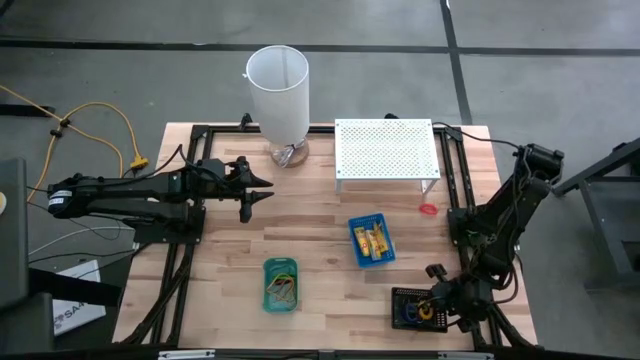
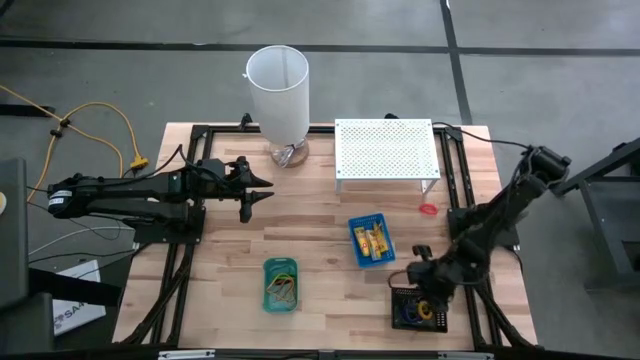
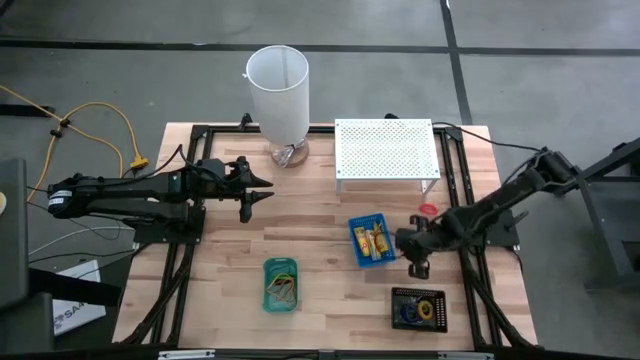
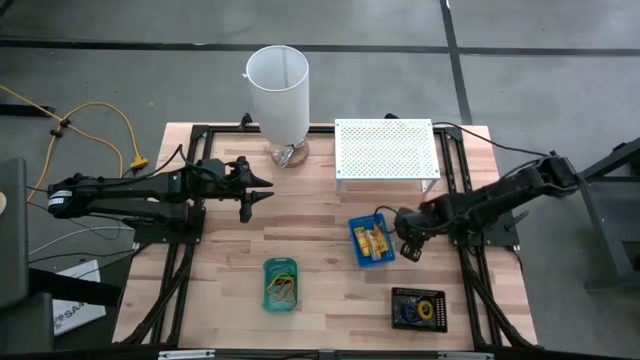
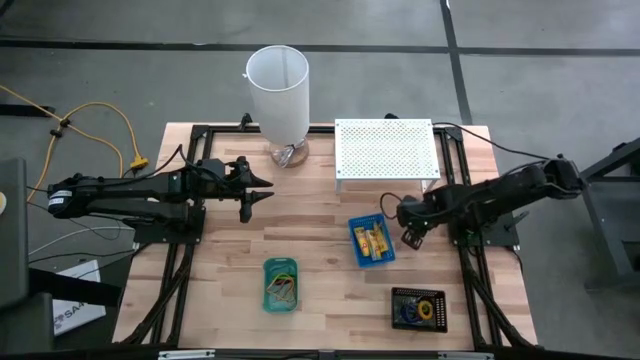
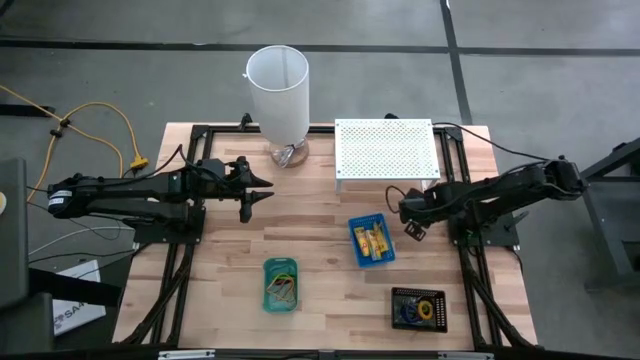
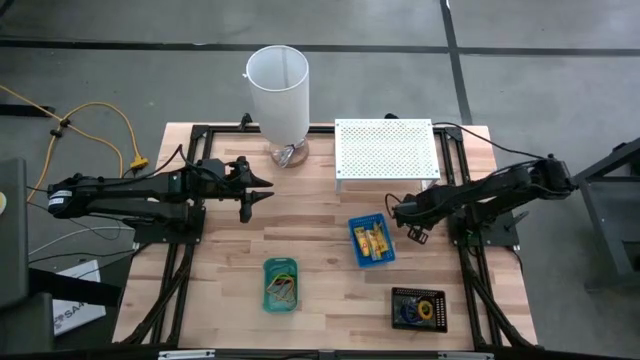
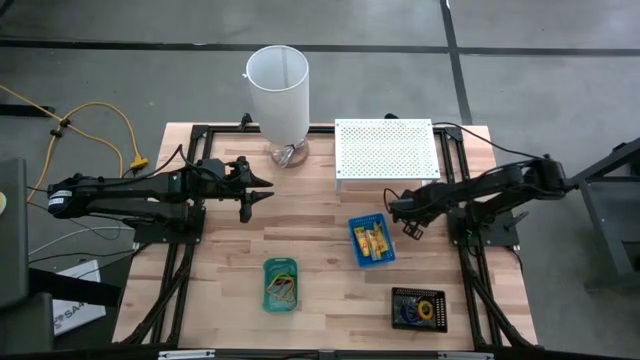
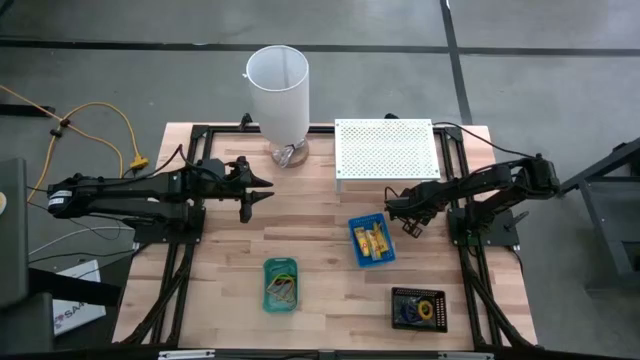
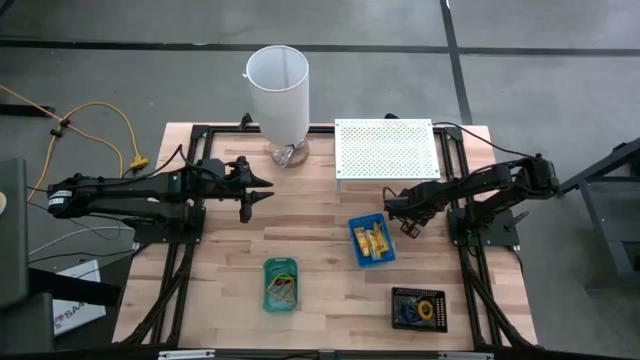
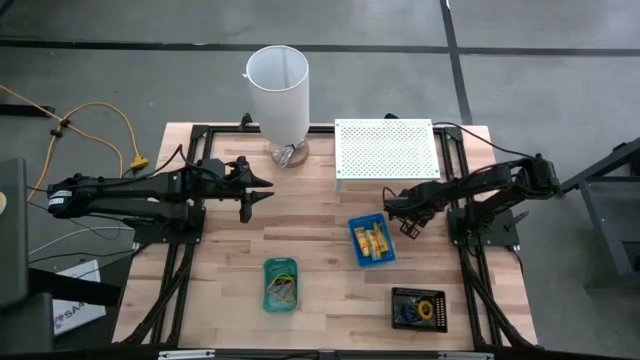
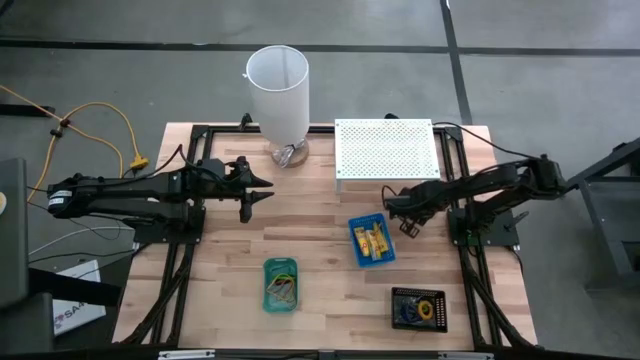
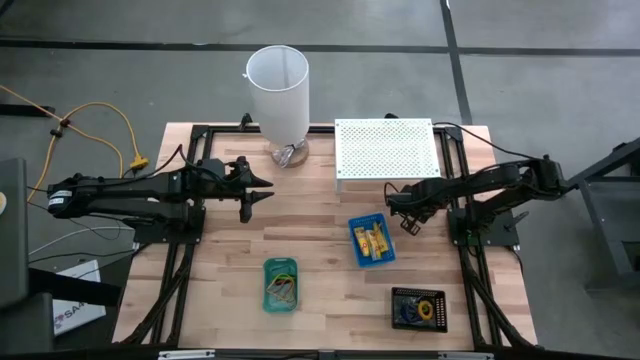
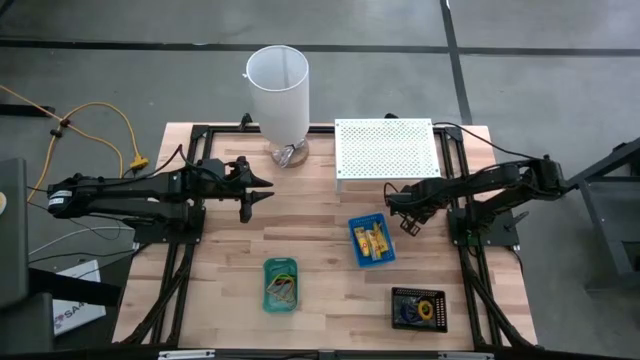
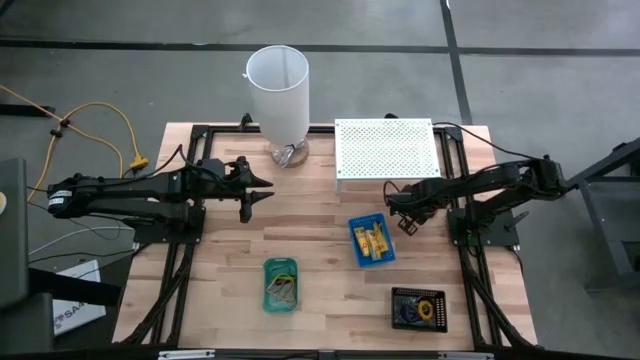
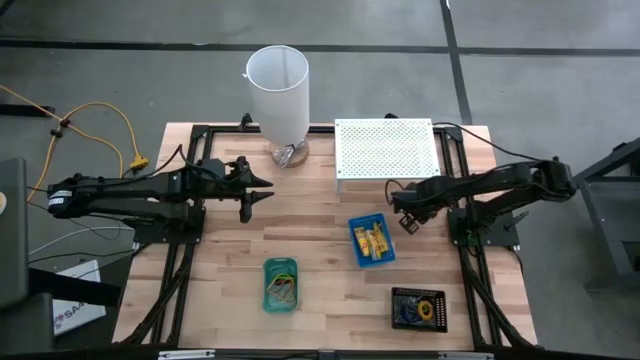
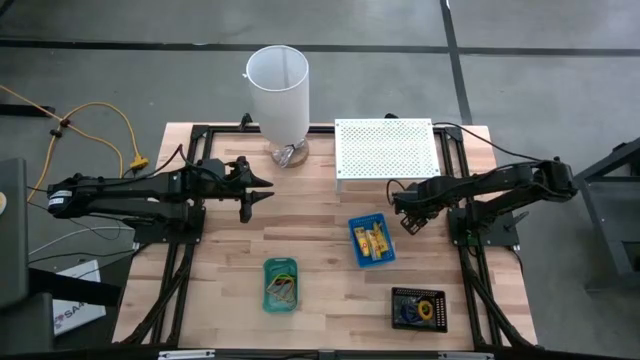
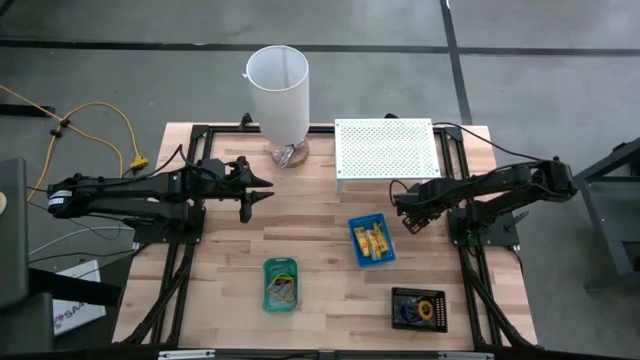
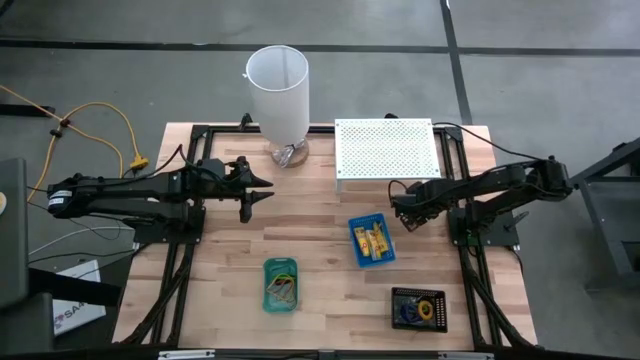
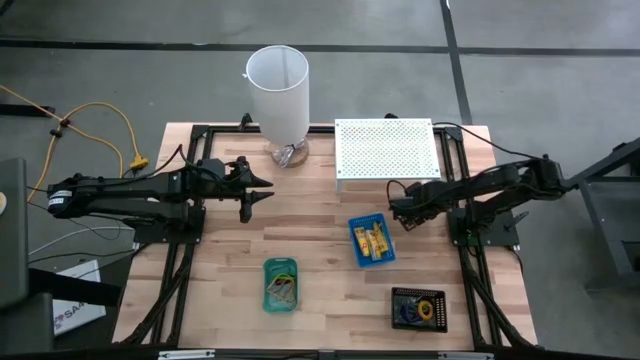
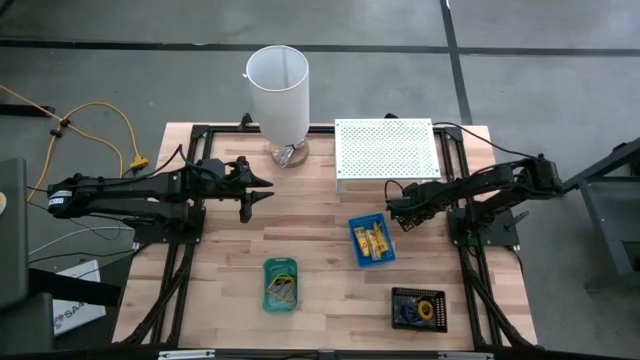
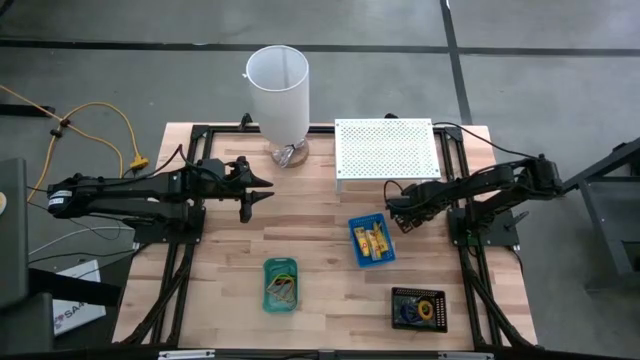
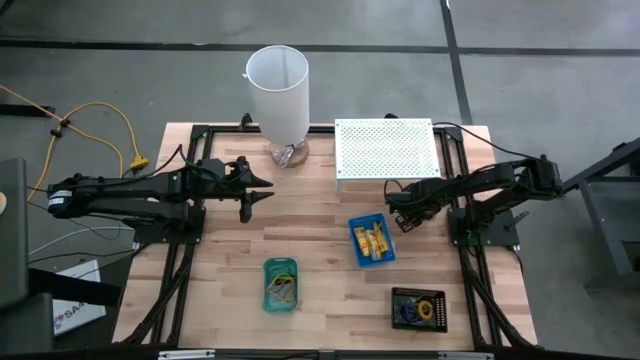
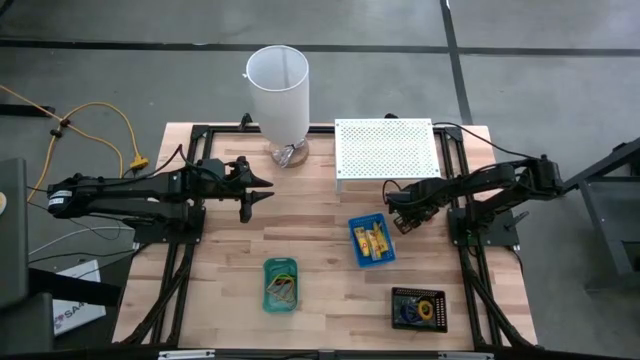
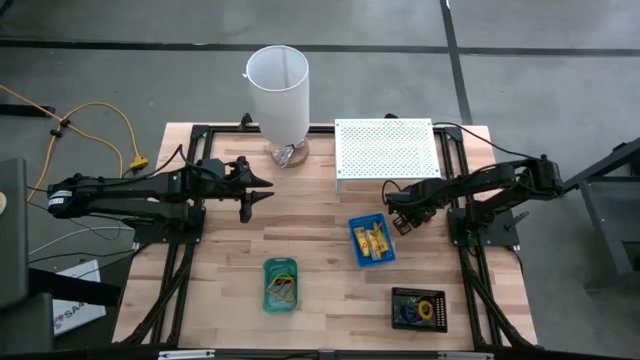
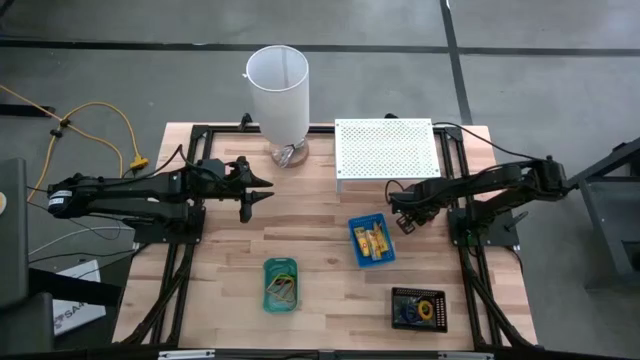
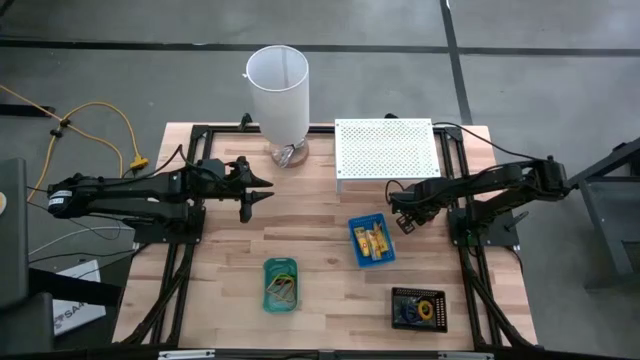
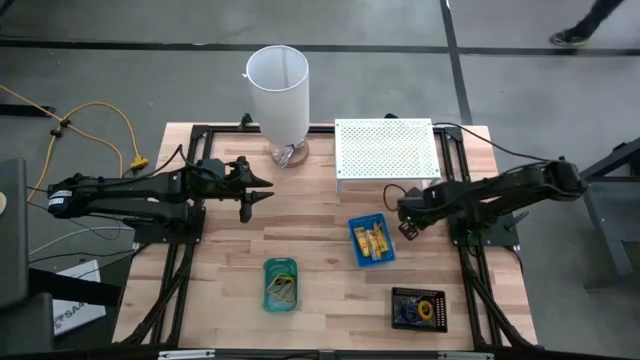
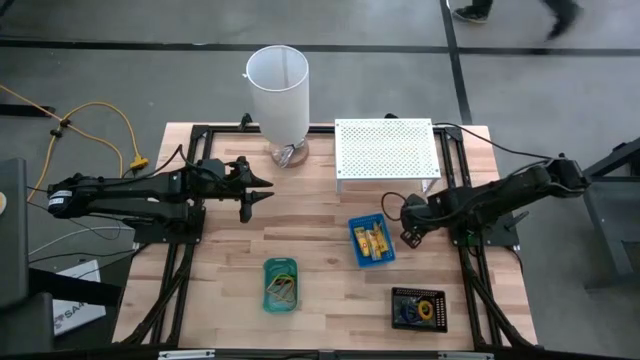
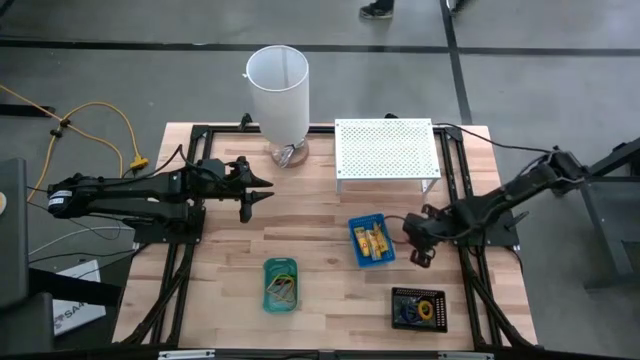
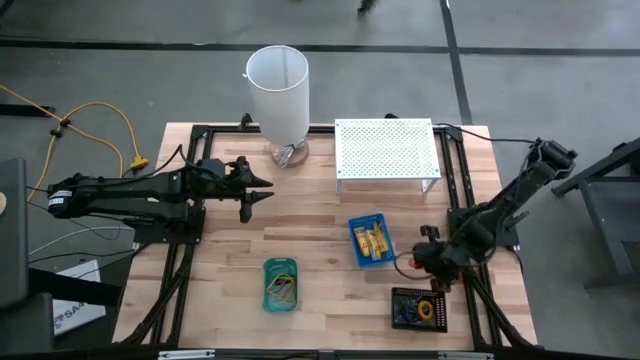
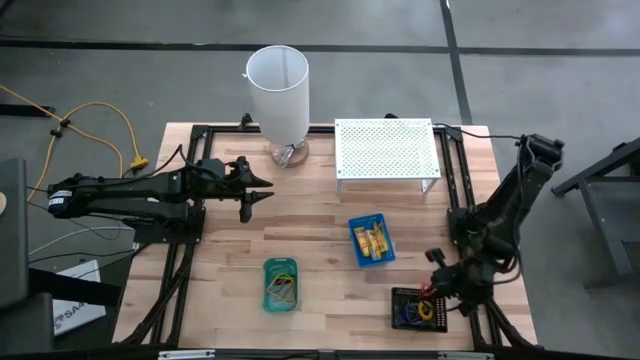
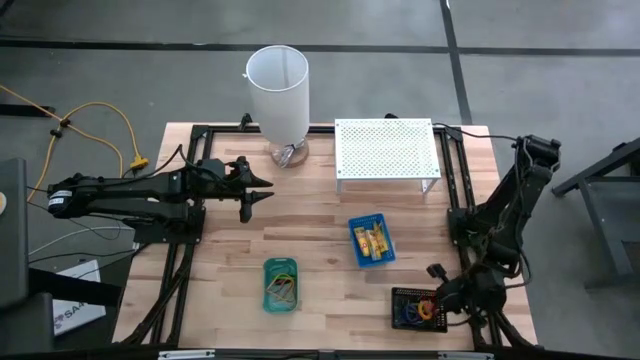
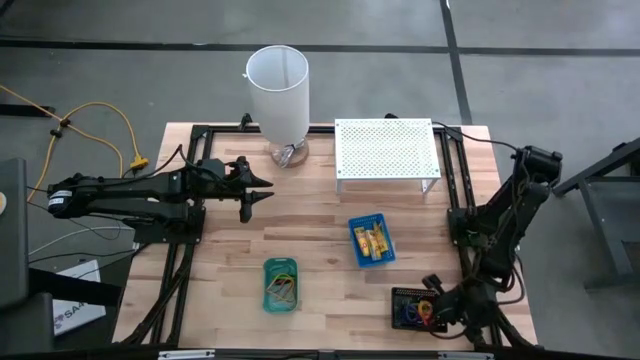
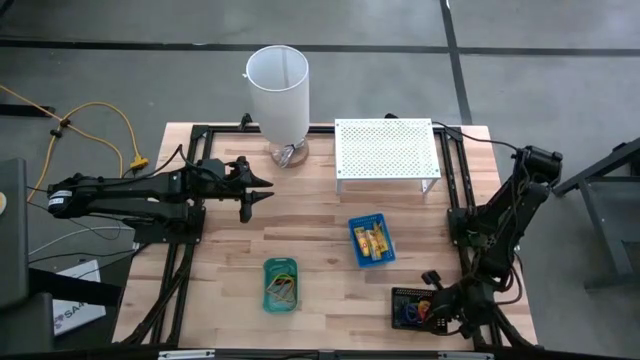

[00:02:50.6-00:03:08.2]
Task: Pick & Place Office Desk Supplies
Put the orange spring rubber band into the black bin

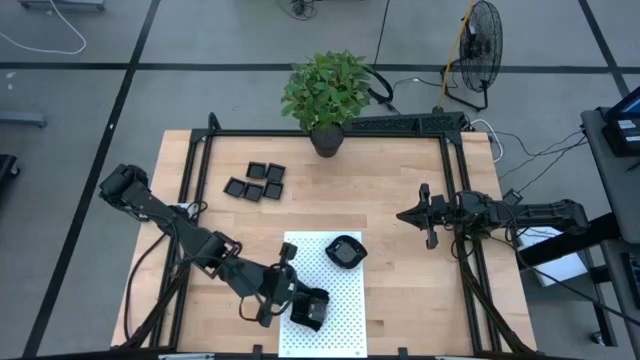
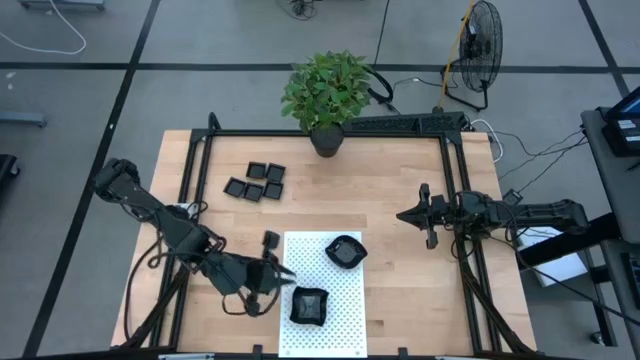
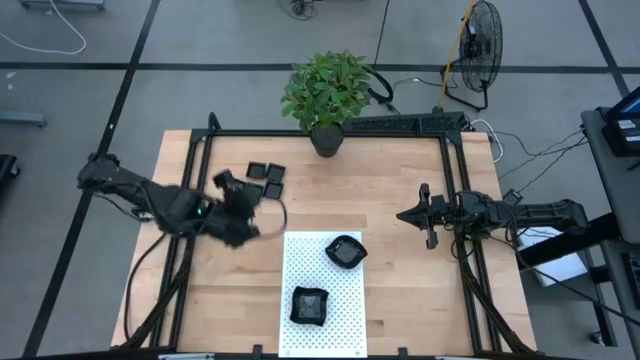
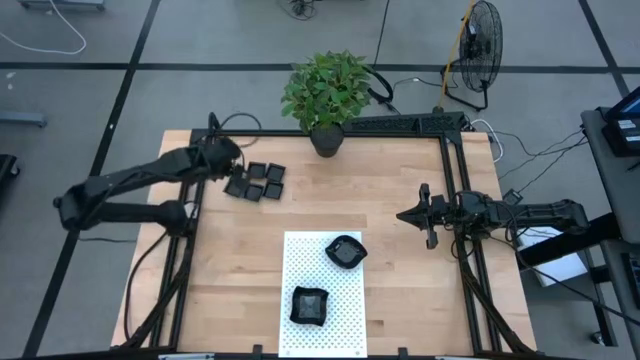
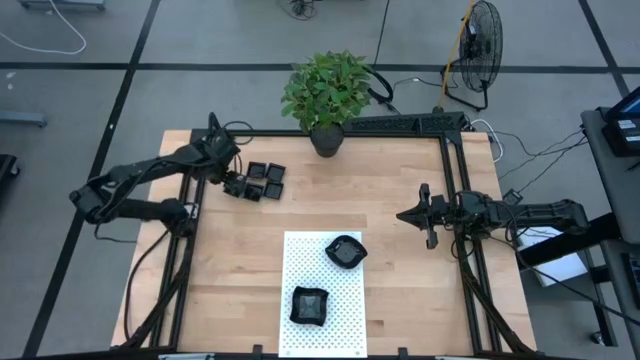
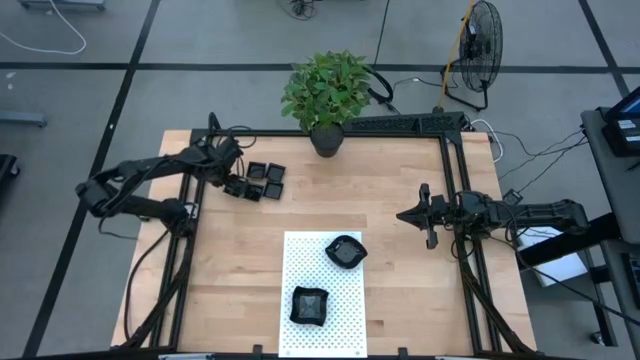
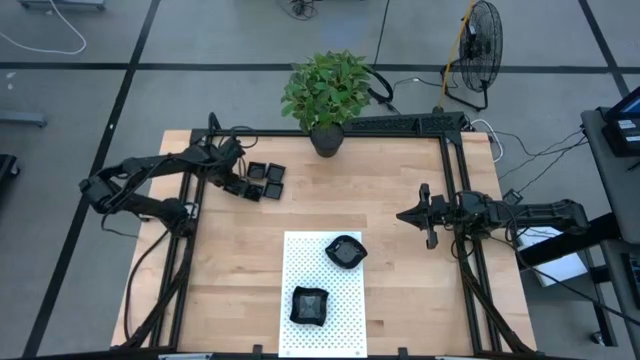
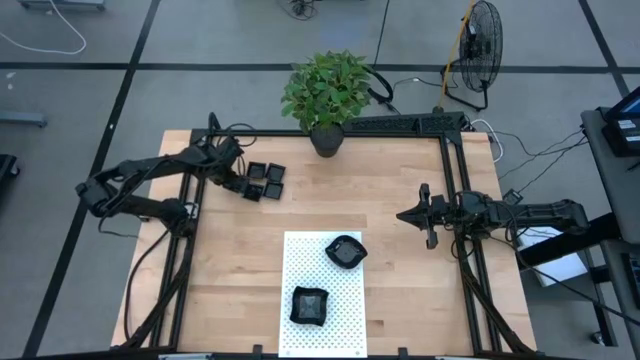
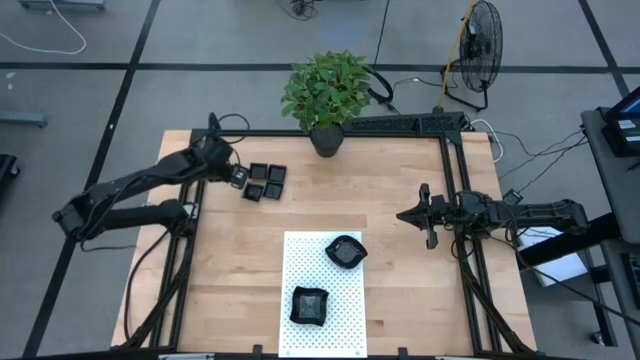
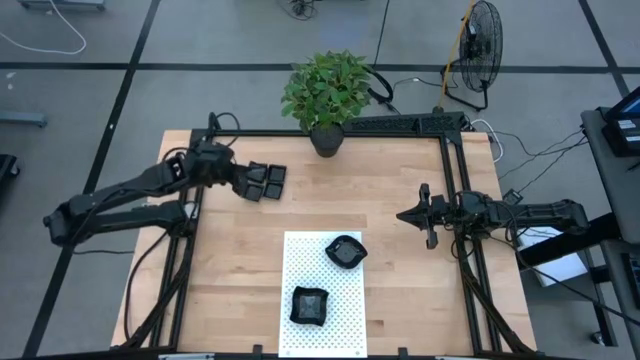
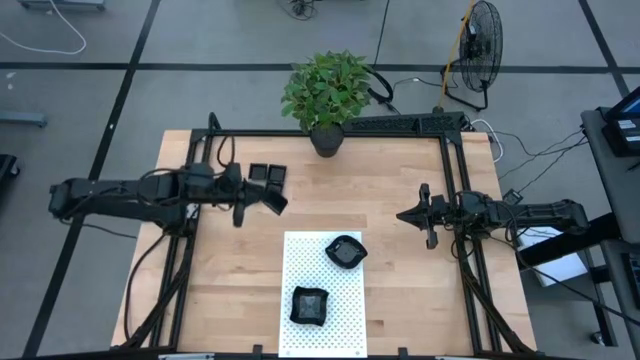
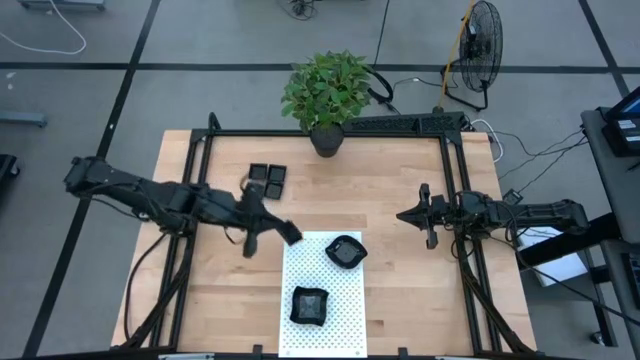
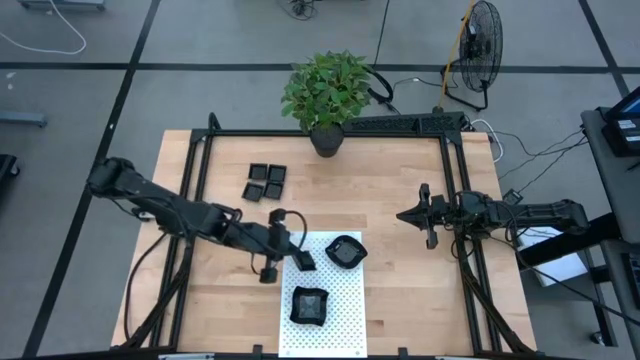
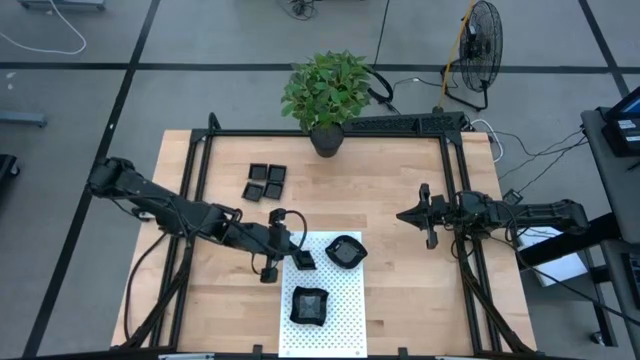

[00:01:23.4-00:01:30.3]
Task: Pick & Place Mini shaped plates
Put the square plate on the shelf
